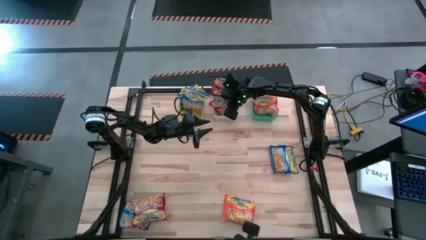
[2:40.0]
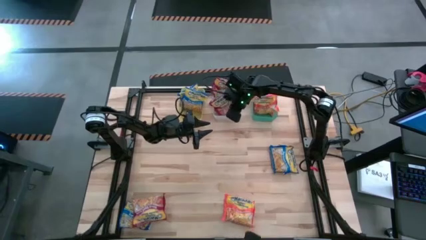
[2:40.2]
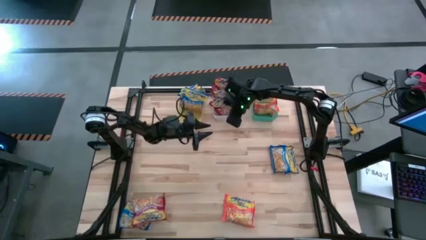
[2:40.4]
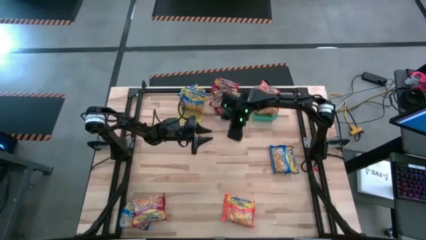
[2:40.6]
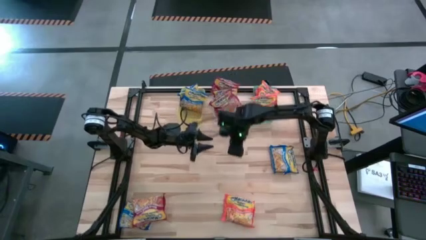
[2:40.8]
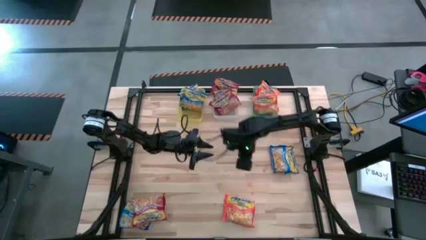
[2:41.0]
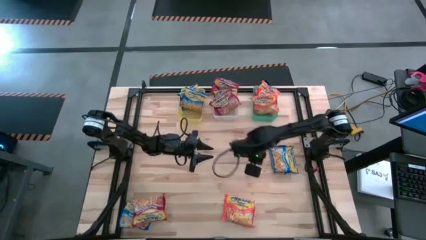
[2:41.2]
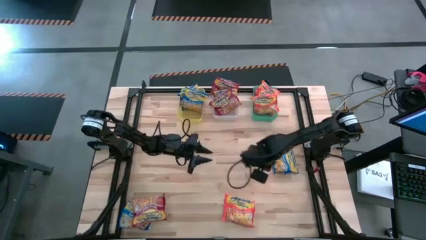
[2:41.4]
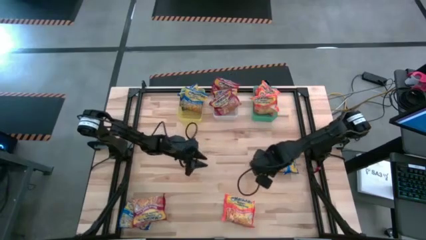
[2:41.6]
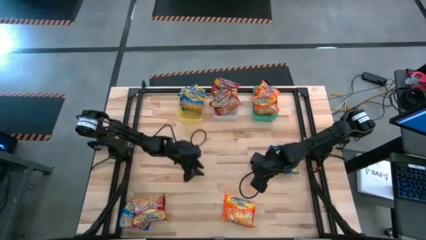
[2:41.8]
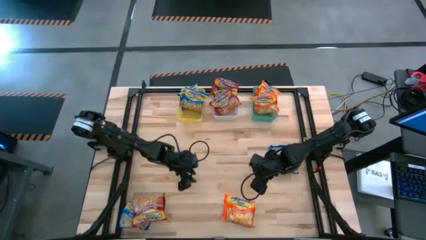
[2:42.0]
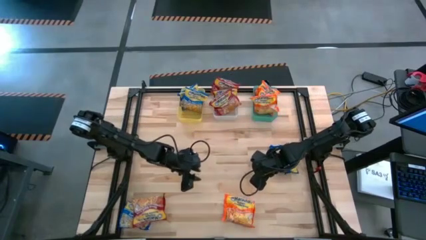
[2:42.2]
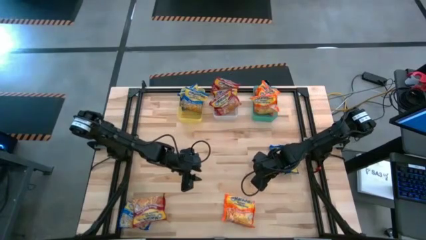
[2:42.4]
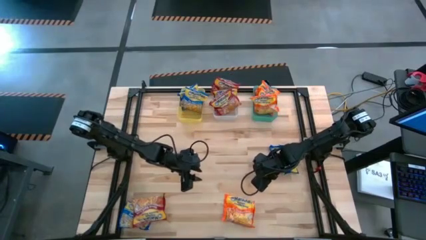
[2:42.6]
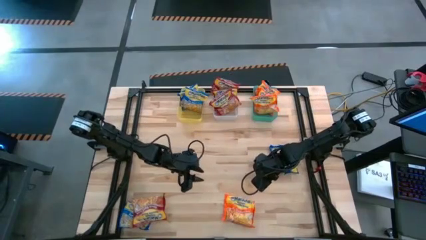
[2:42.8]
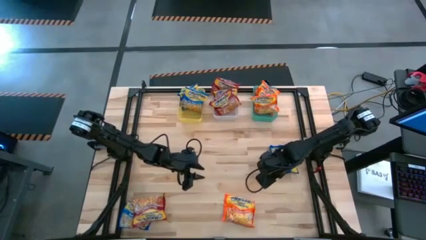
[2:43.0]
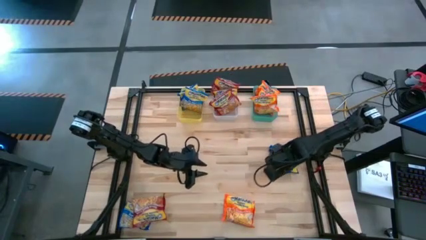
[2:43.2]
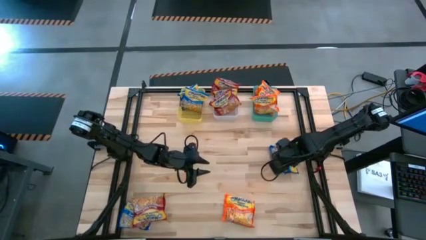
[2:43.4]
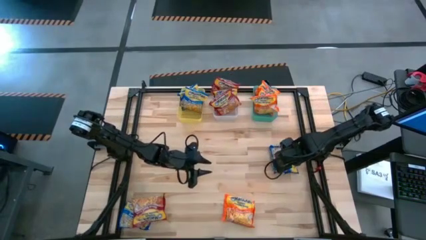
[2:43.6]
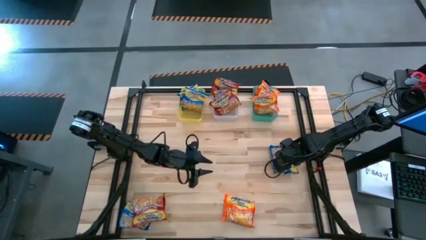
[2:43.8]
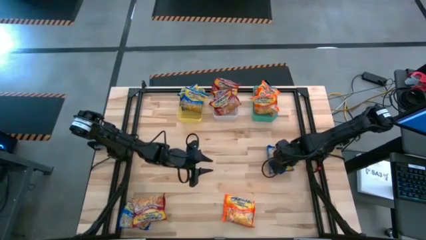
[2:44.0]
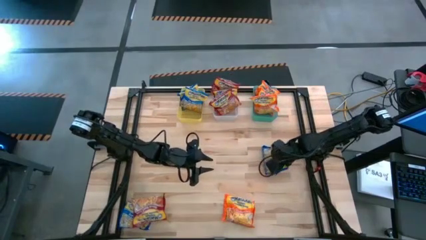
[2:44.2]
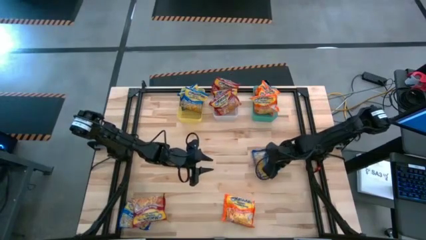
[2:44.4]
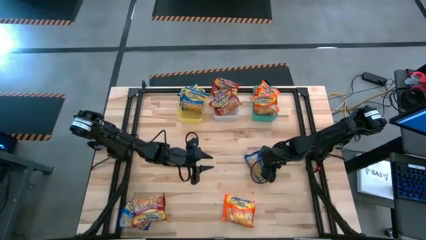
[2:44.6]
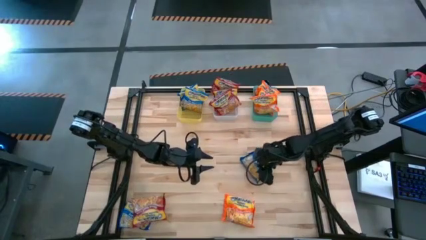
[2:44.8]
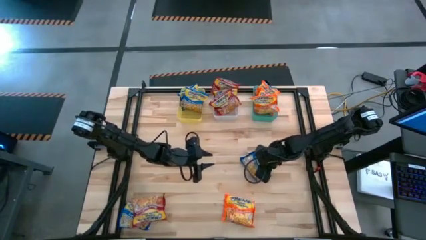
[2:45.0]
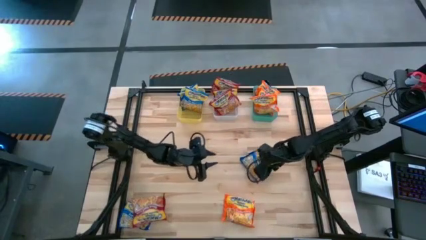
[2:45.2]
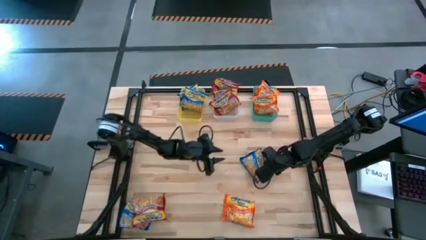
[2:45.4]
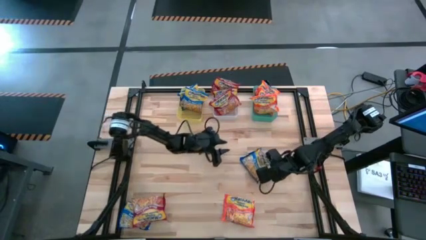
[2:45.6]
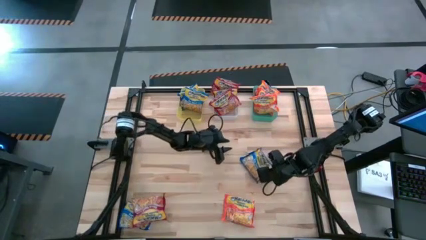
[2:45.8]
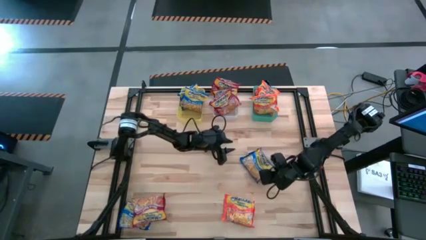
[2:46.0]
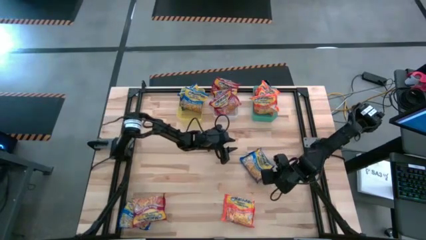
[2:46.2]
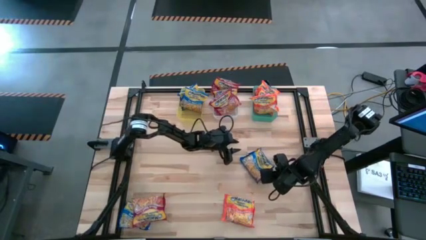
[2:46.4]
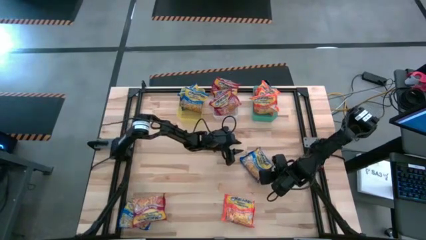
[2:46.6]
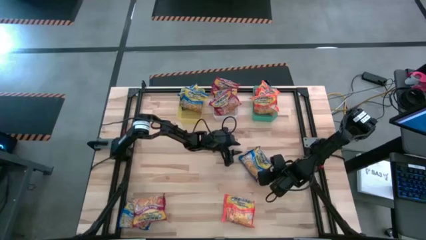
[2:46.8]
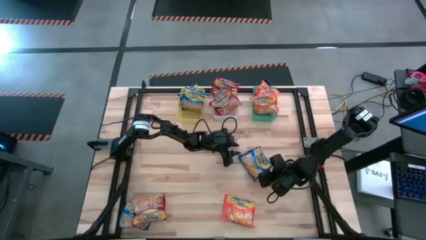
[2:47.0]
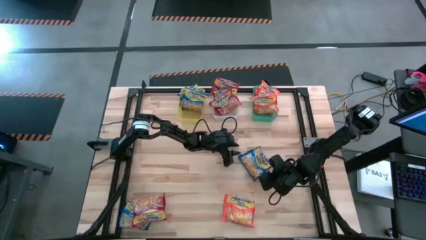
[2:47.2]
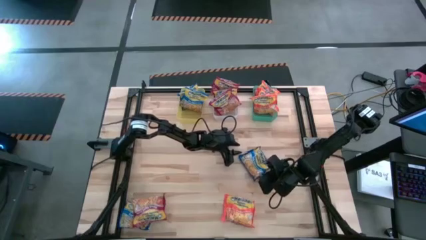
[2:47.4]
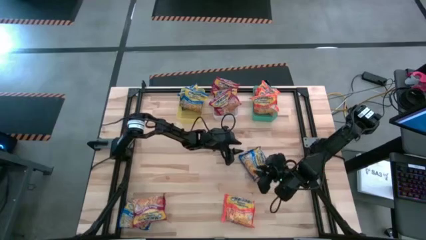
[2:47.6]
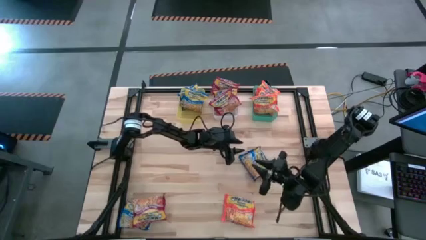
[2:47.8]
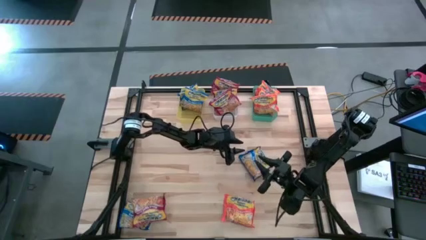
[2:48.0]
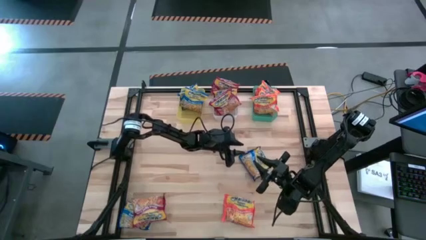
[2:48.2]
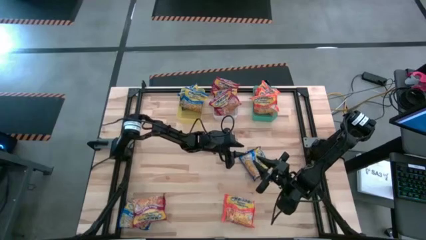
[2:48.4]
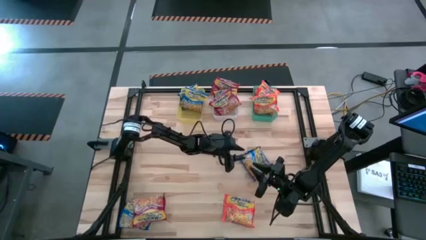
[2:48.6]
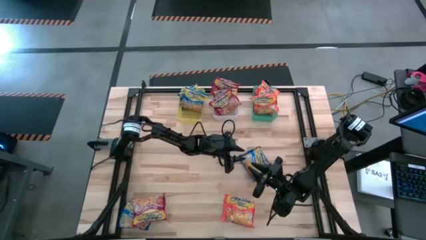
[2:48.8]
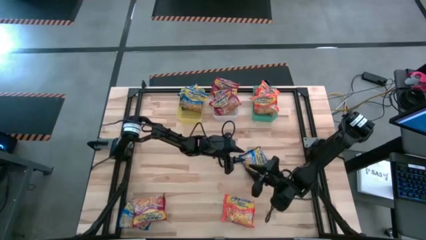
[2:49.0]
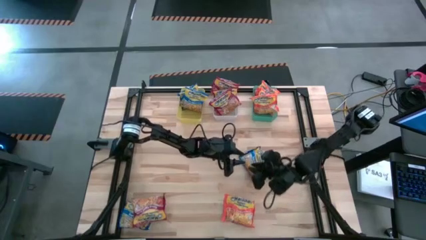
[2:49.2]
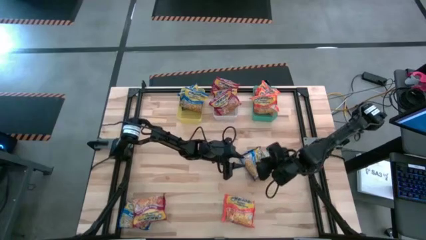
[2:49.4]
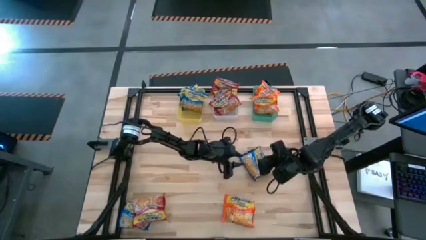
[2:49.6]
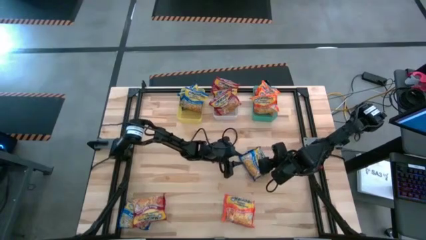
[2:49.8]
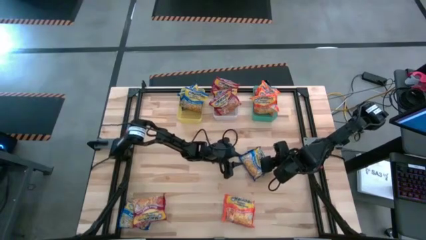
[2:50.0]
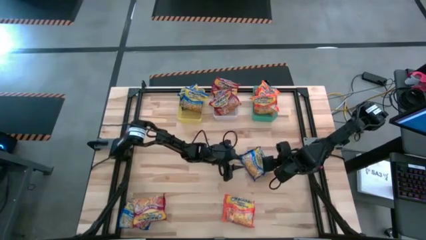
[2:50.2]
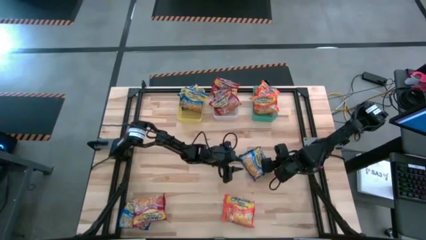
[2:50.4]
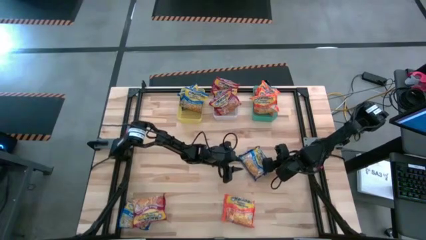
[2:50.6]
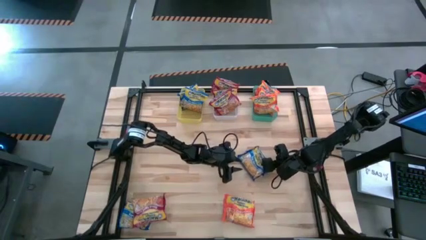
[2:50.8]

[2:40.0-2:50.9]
Task: Sort Maruchan noodles
Put the top blue noodle pack into the yellow bin

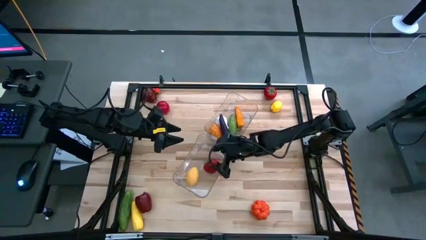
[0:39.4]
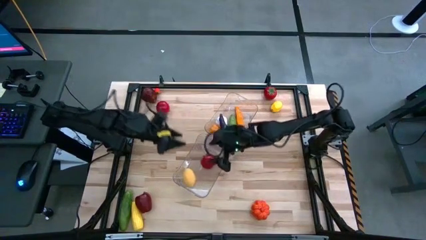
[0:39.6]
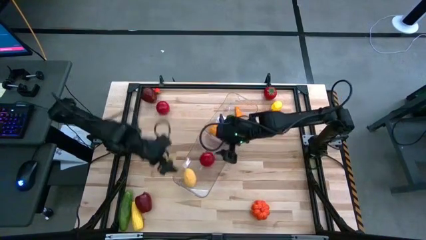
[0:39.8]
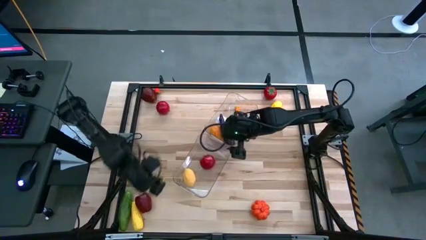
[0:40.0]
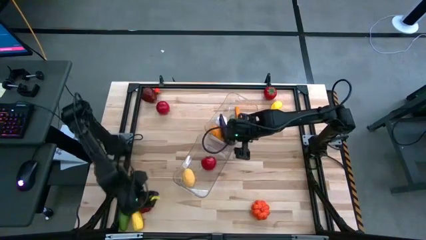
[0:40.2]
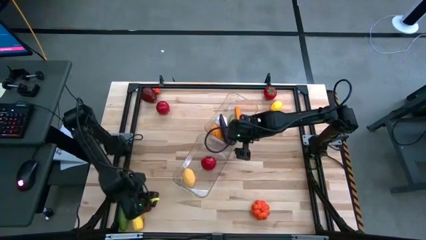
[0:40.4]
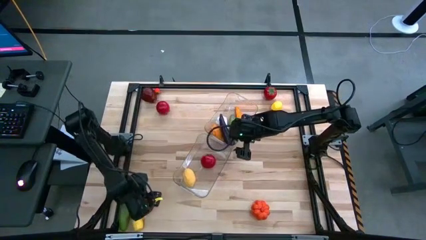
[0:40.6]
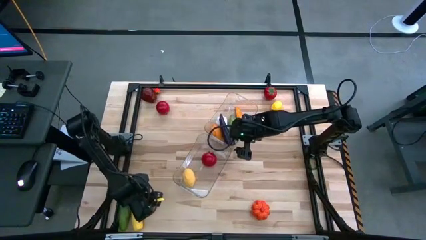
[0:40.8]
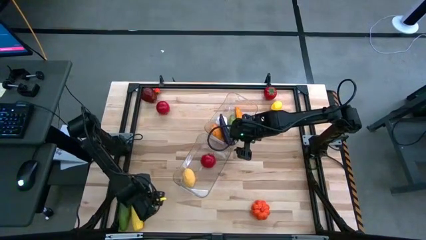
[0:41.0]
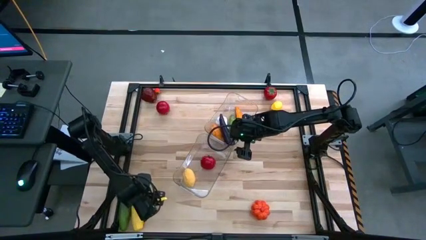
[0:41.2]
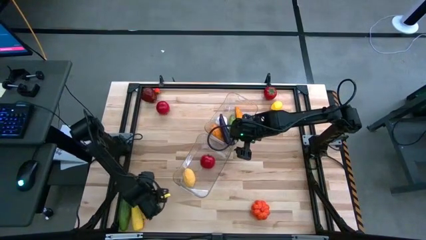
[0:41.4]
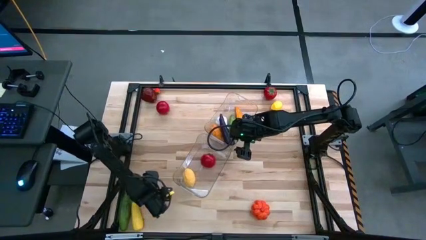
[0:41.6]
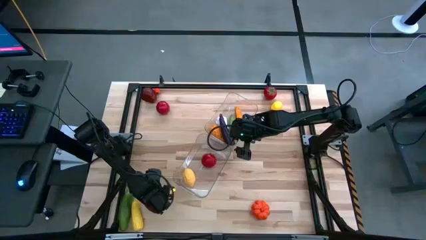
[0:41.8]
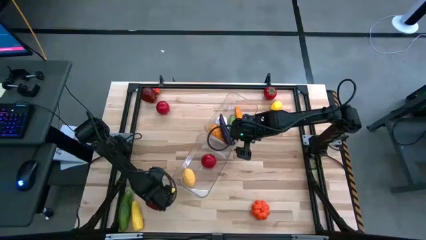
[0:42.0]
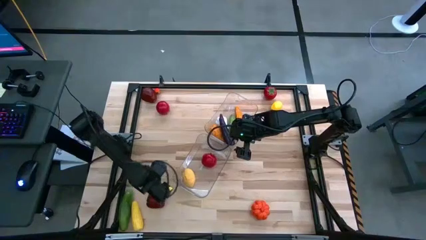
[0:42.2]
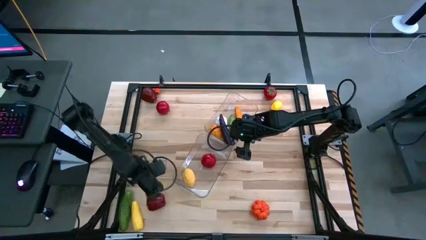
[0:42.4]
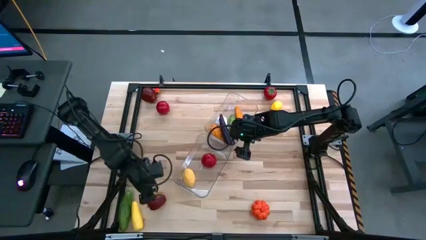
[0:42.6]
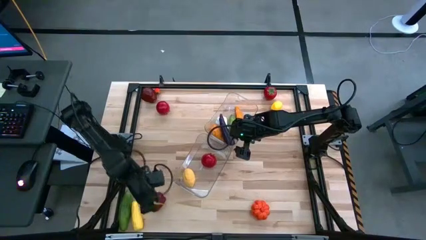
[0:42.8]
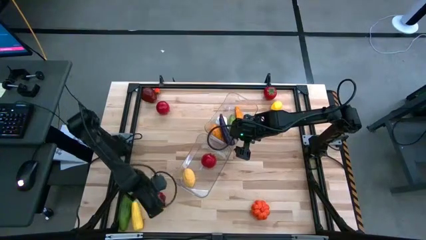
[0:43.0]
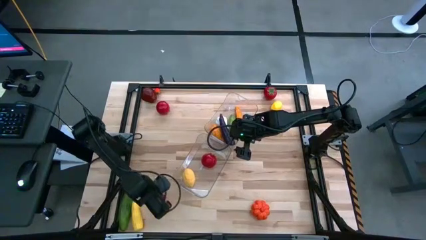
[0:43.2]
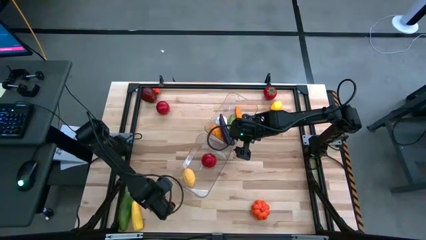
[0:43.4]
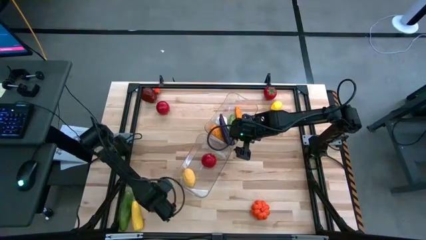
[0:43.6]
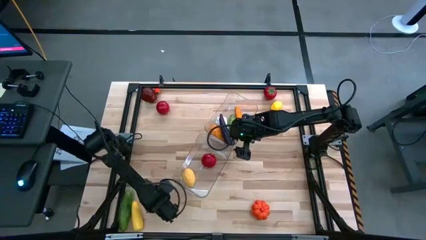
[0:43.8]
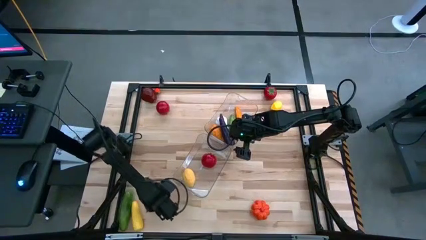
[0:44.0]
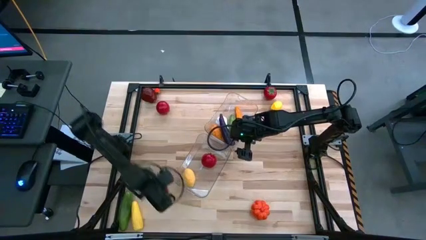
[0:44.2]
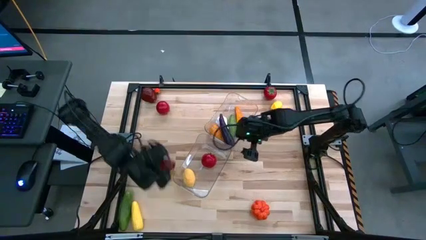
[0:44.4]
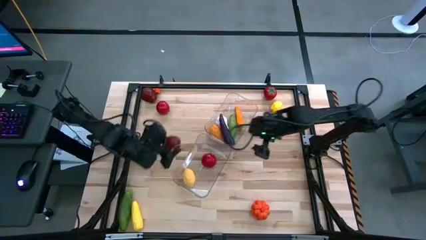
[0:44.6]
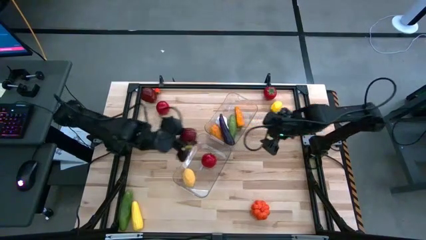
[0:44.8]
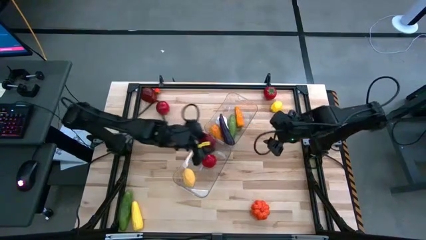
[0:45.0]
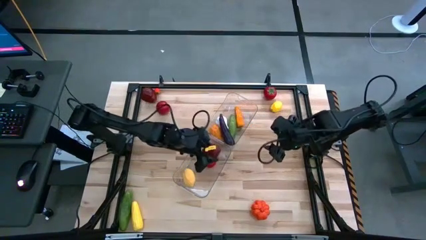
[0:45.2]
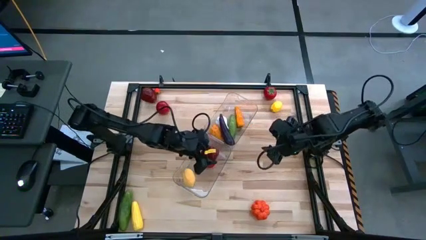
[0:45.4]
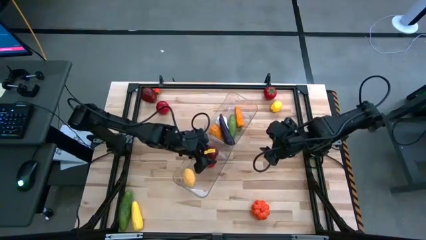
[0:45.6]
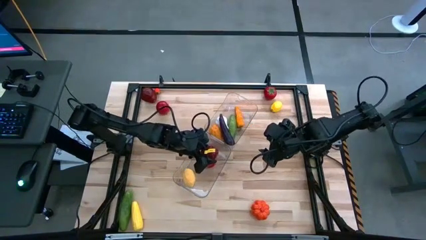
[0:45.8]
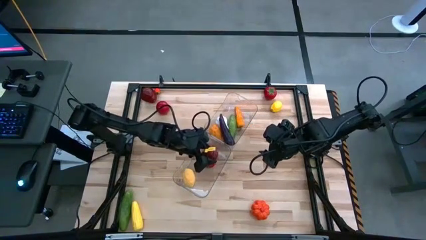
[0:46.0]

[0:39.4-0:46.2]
Task: Sort produce into baskets
Put the bottom red apple into the top transparent bin
